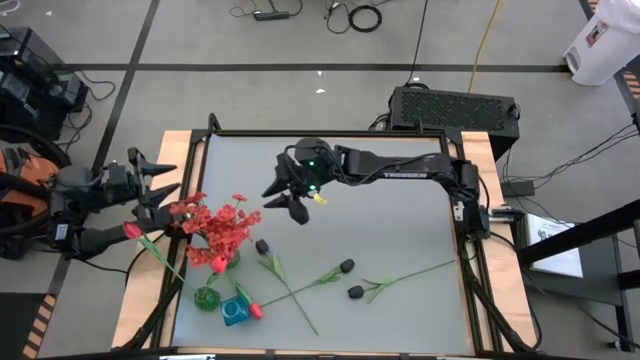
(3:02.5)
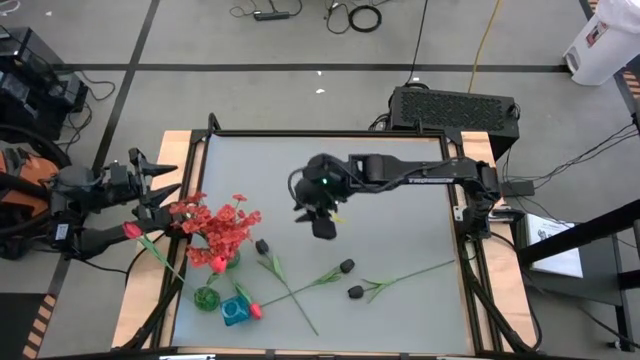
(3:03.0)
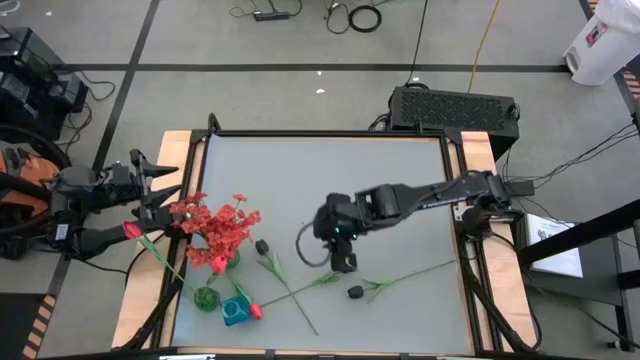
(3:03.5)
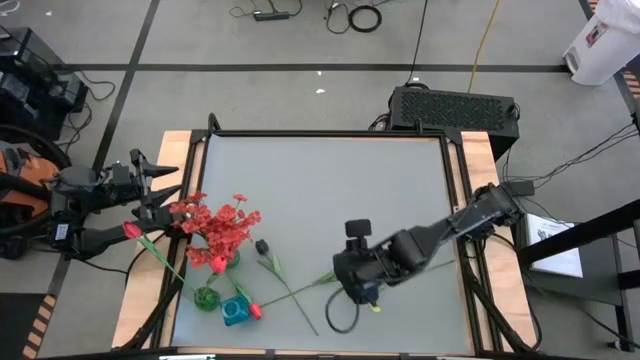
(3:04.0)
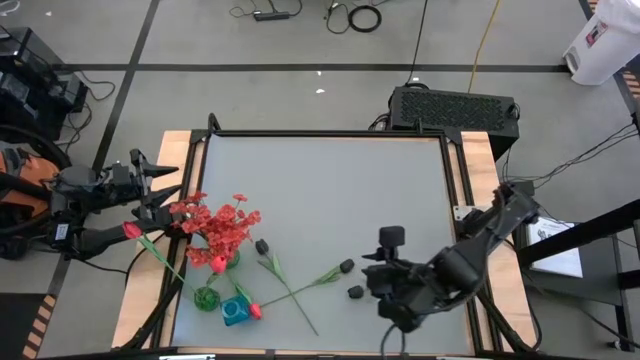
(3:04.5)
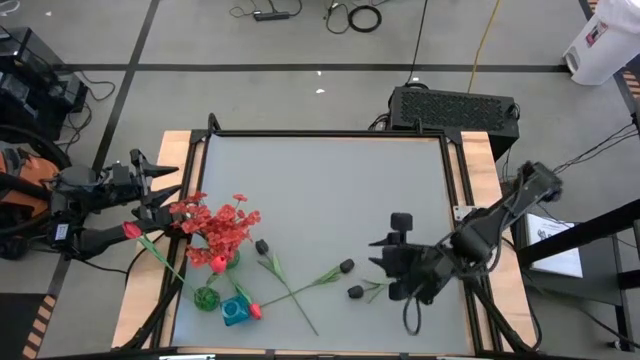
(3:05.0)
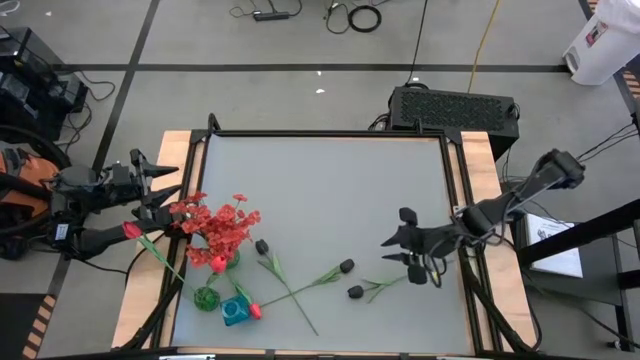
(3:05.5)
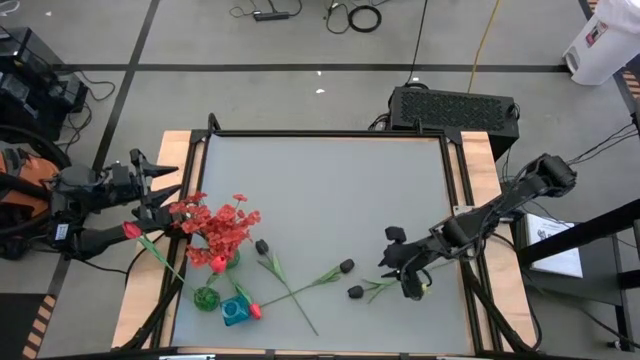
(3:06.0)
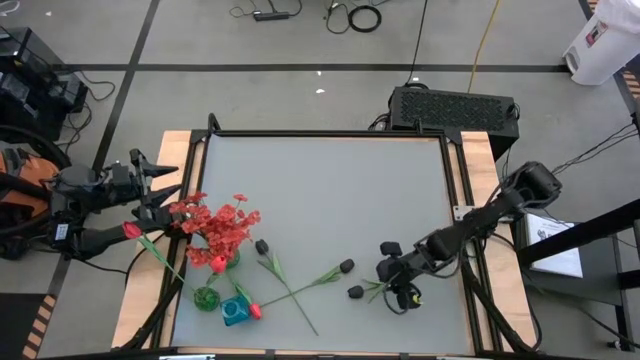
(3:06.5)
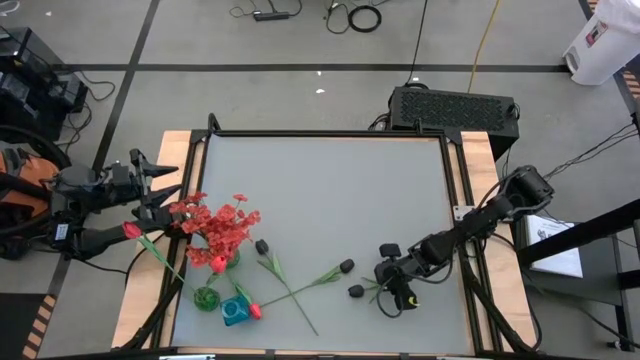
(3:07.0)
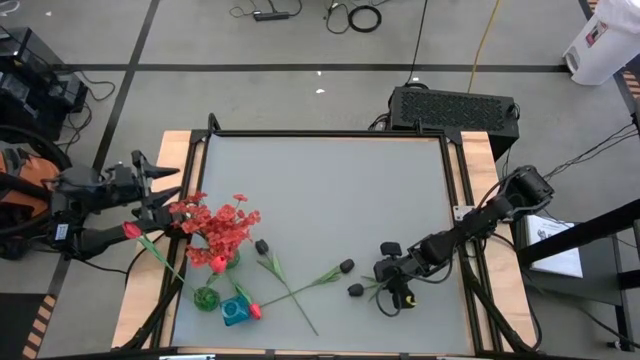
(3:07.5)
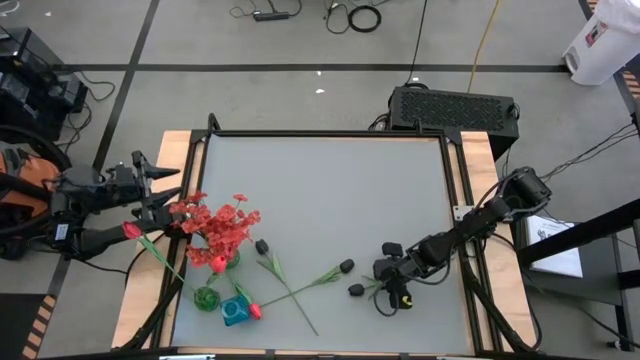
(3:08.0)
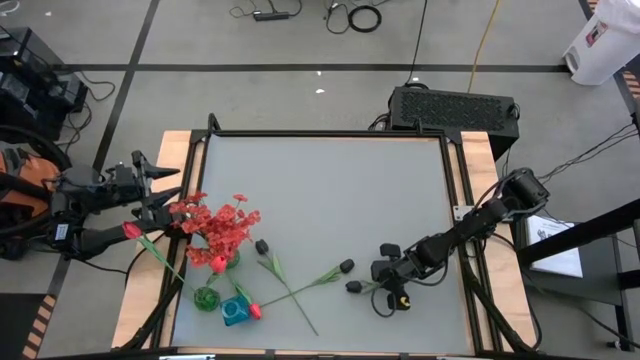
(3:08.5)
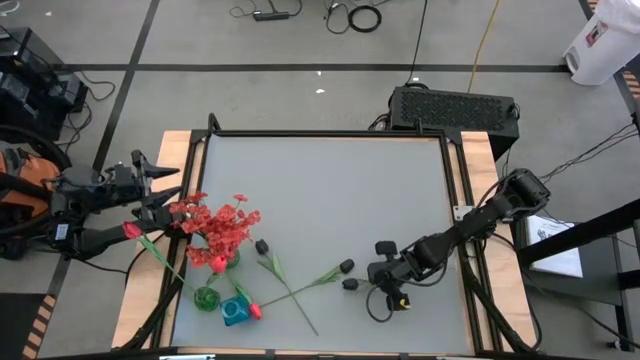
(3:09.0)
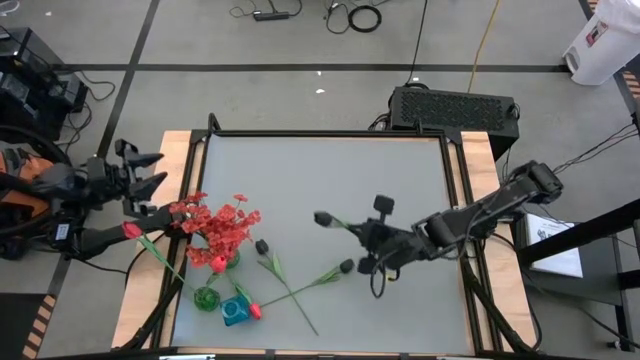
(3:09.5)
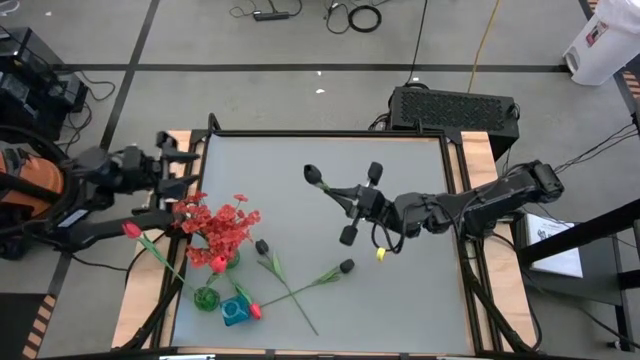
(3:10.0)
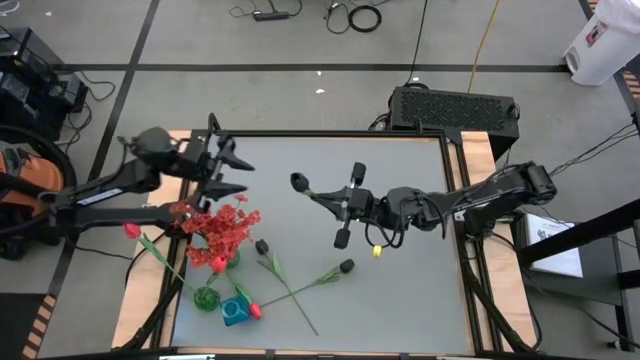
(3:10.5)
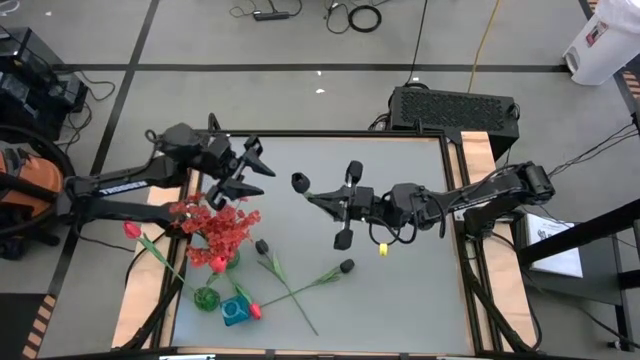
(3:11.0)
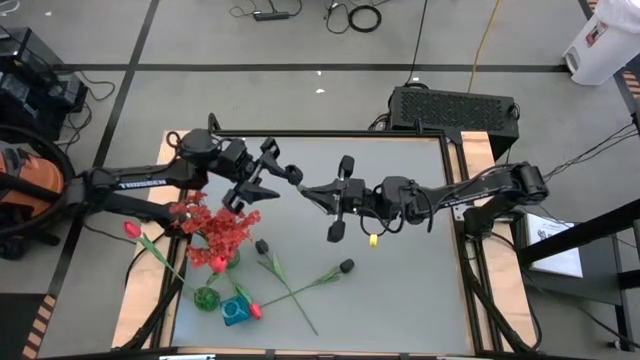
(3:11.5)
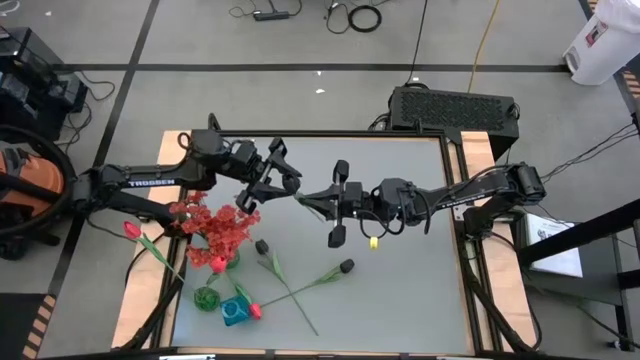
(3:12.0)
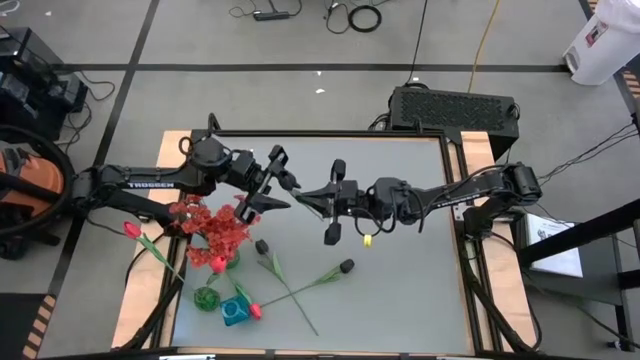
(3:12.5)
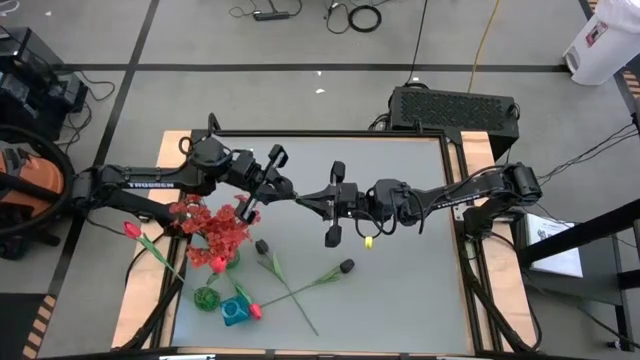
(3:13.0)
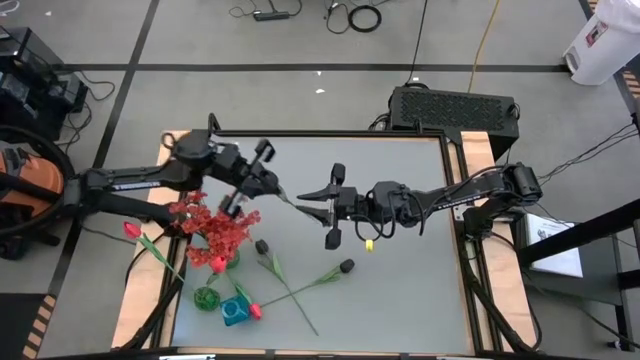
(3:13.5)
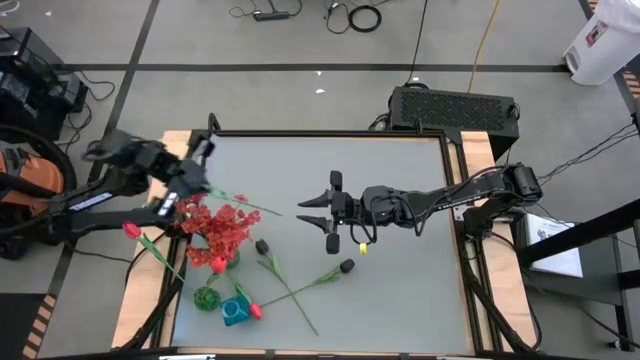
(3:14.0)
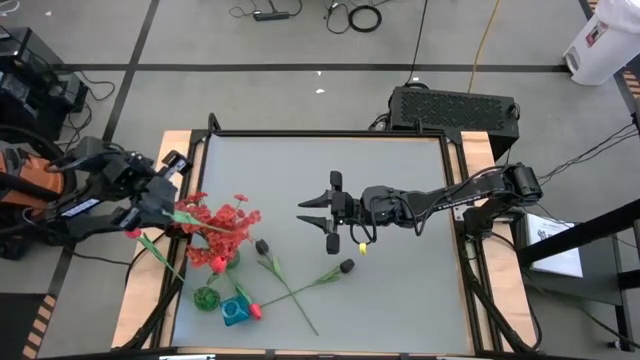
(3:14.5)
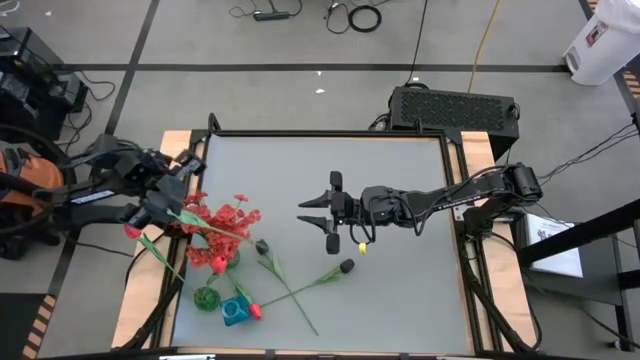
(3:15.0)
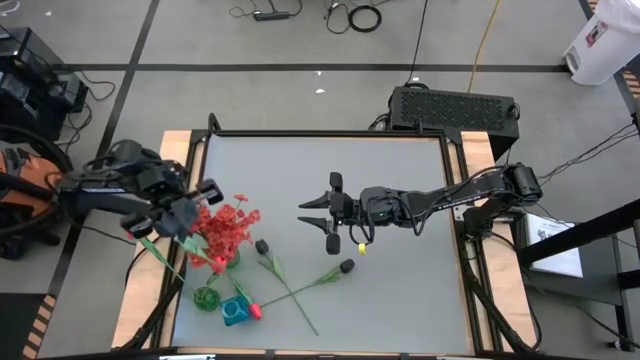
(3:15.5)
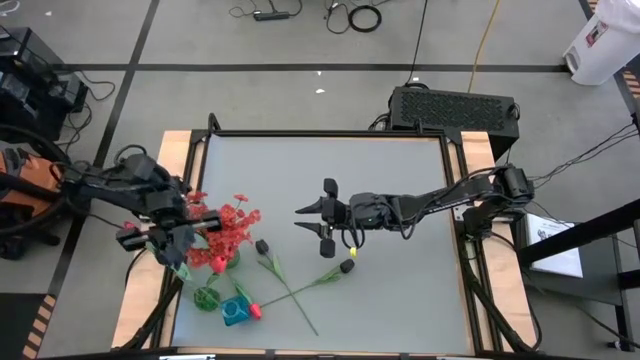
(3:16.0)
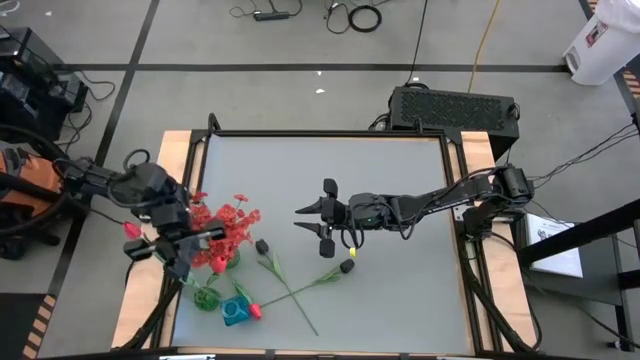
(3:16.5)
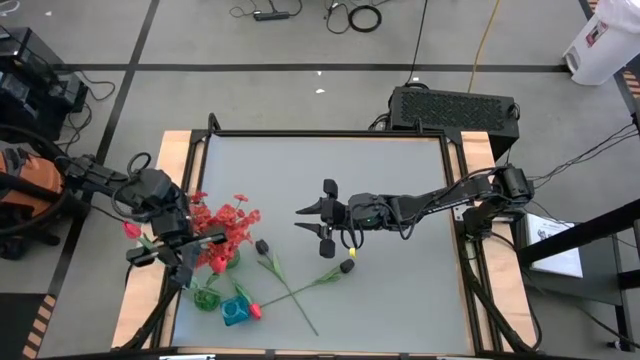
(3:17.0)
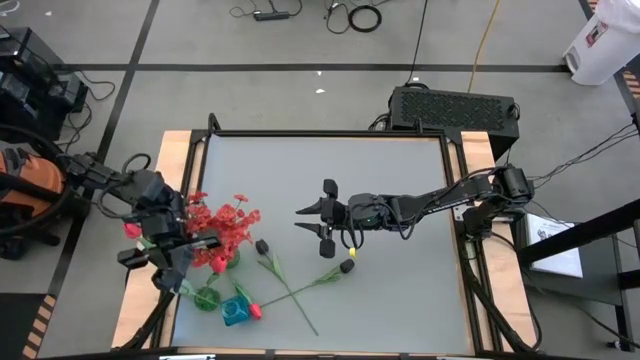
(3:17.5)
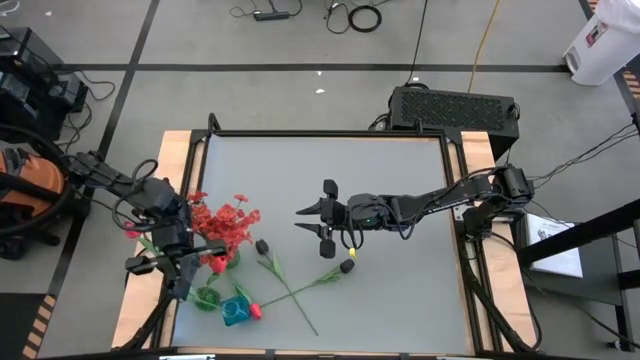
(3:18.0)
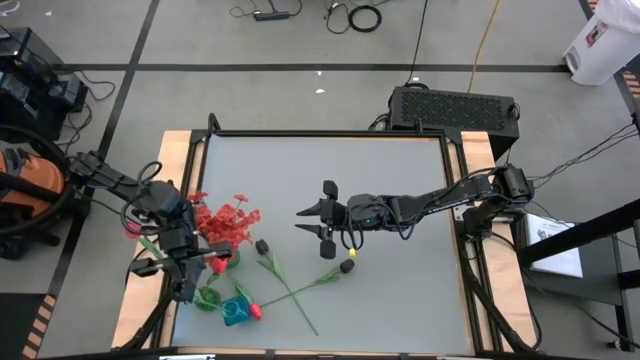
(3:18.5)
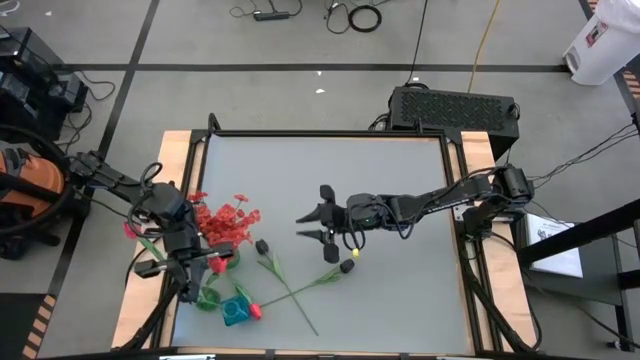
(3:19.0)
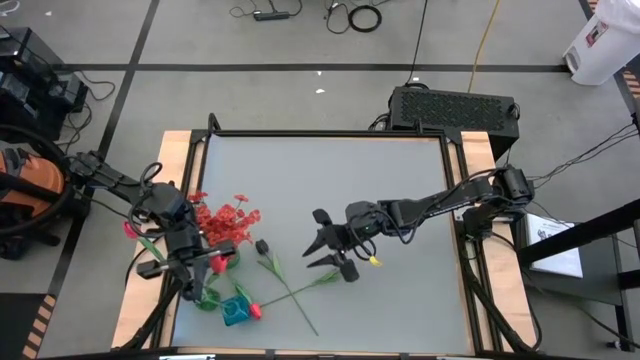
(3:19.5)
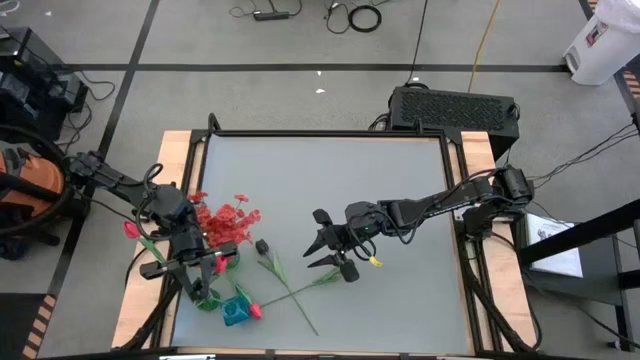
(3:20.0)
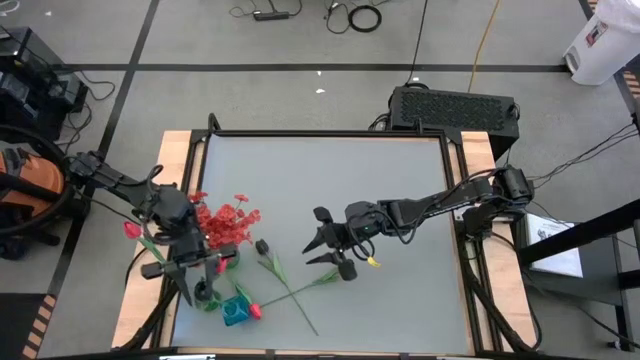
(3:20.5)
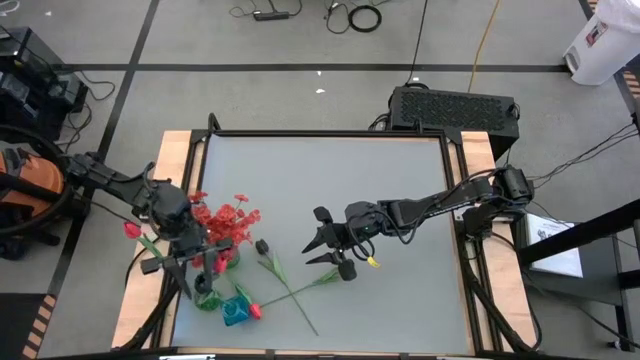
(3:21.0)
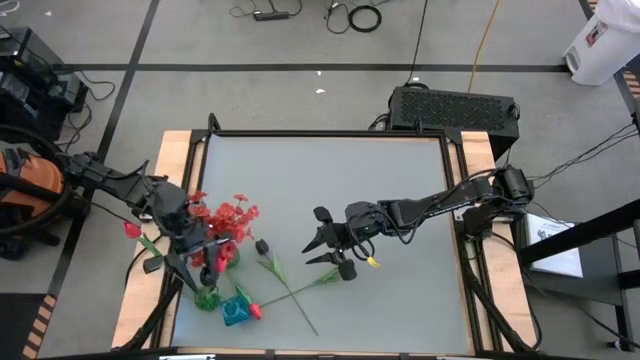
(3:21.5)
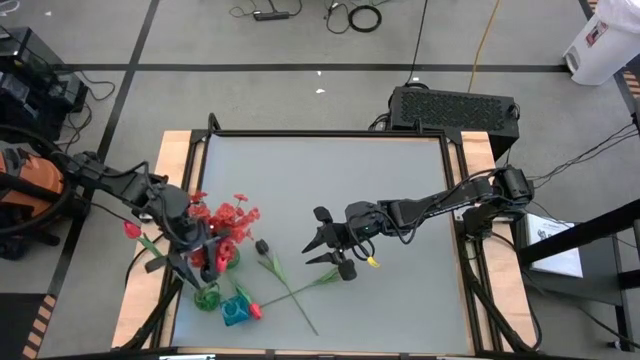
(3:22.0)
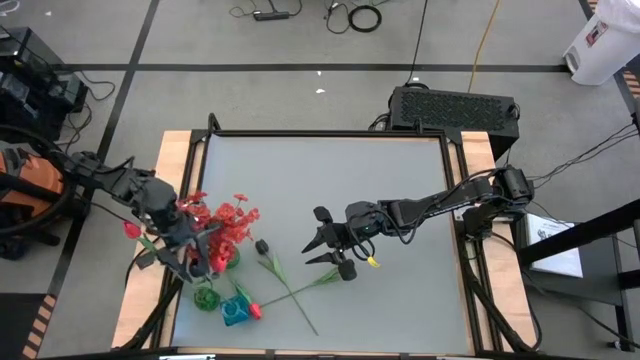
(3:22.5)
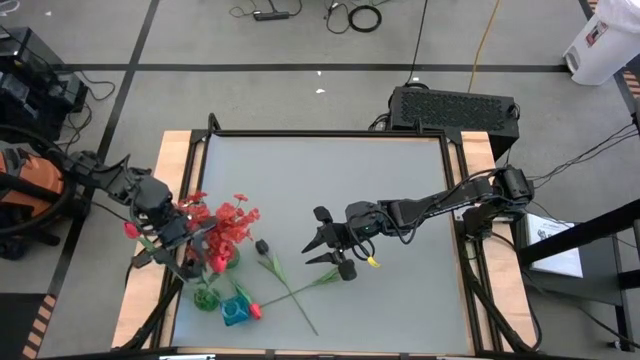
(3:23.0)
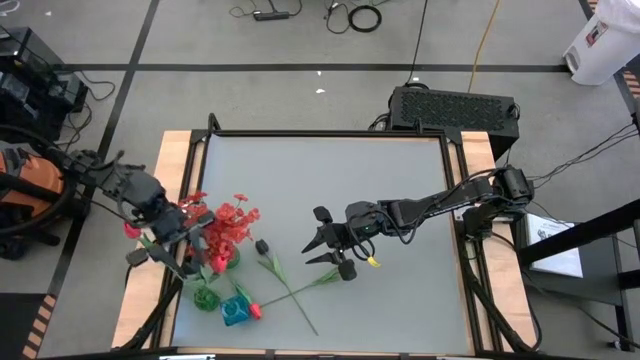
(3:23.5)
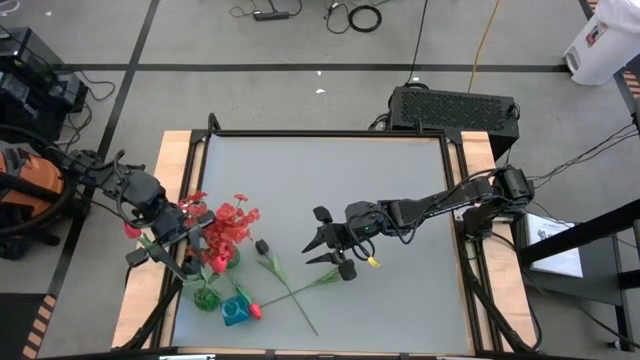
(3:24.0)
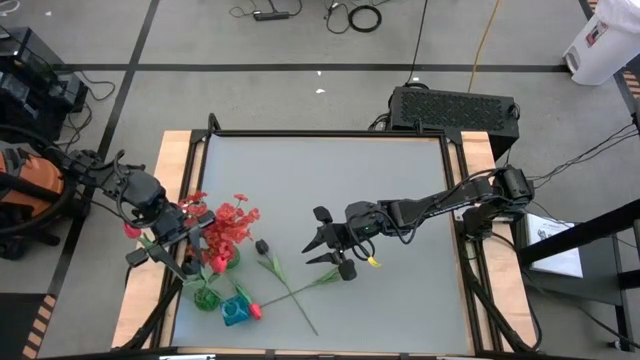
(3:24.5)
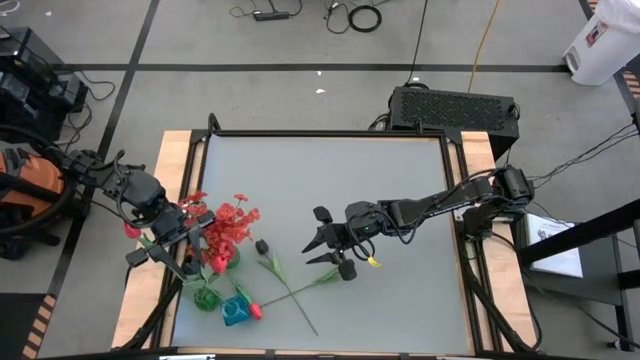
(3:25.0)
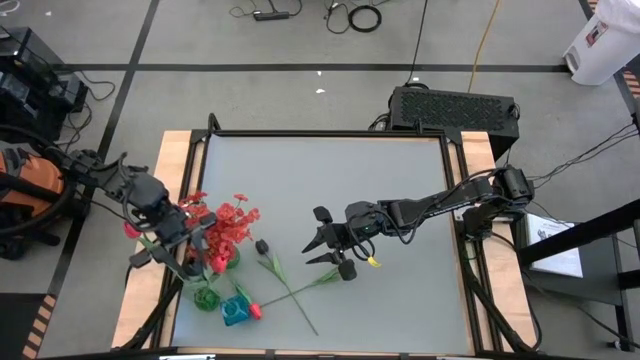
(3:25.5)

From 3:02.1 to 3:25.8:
Task: Sort flowers into vase by color
Put the right black flower into the blue vase
